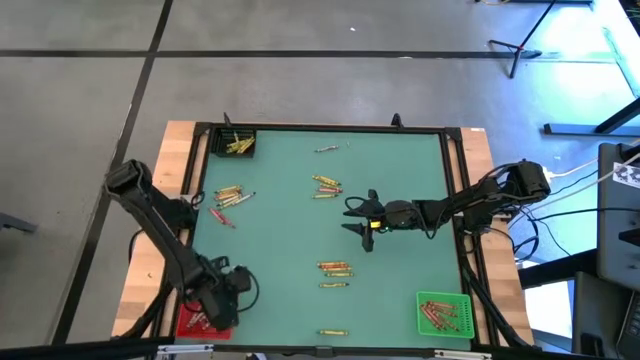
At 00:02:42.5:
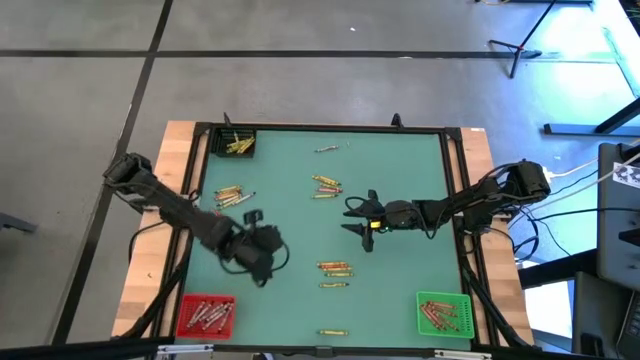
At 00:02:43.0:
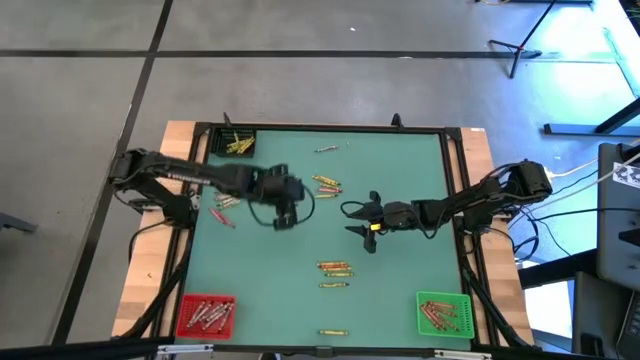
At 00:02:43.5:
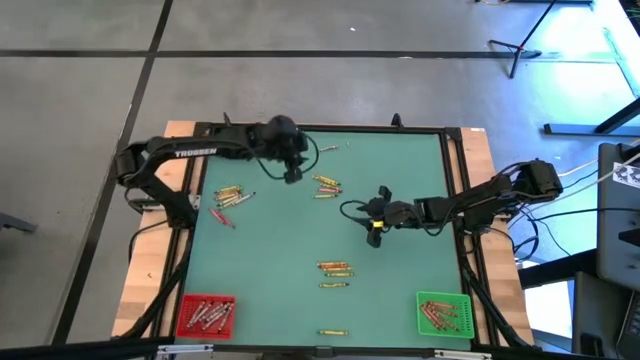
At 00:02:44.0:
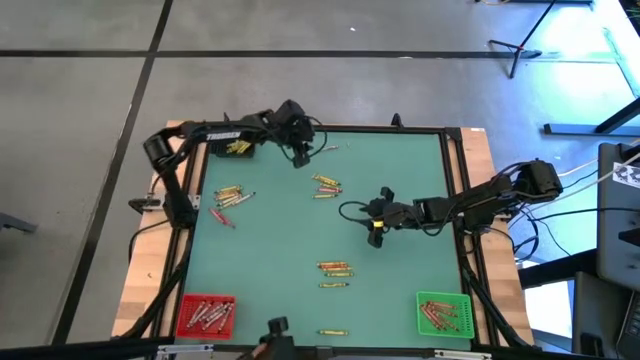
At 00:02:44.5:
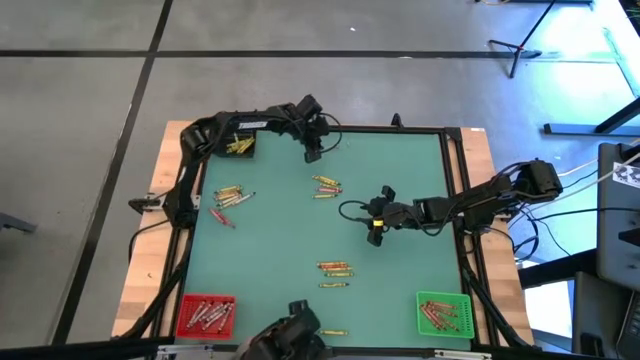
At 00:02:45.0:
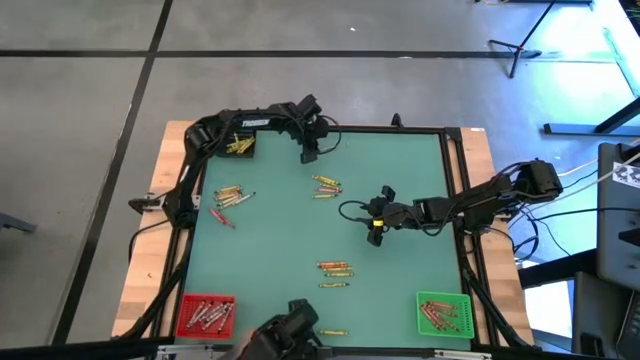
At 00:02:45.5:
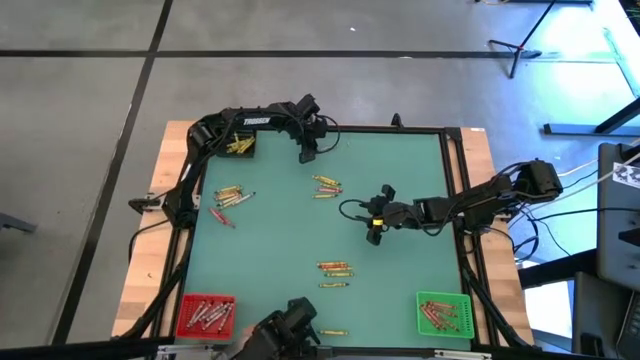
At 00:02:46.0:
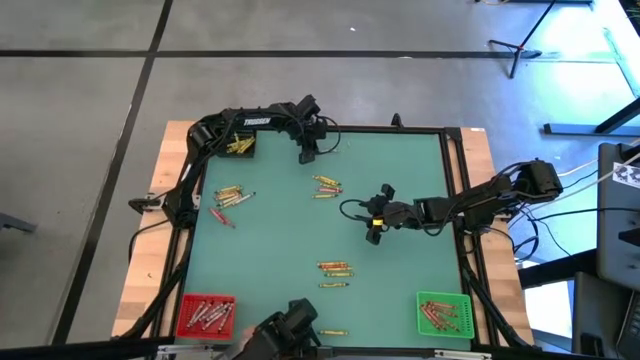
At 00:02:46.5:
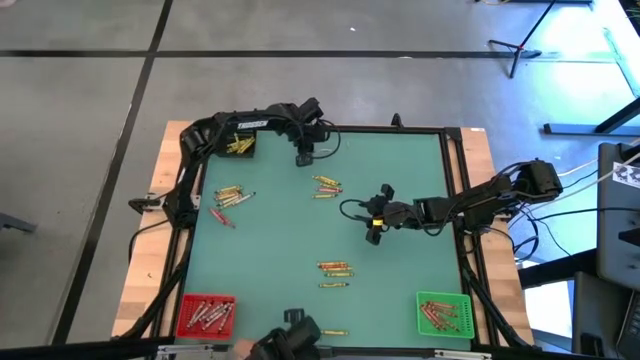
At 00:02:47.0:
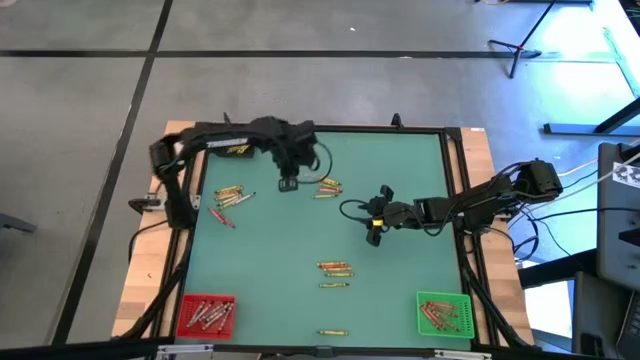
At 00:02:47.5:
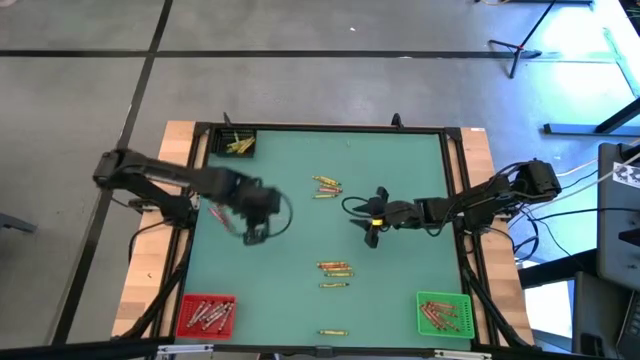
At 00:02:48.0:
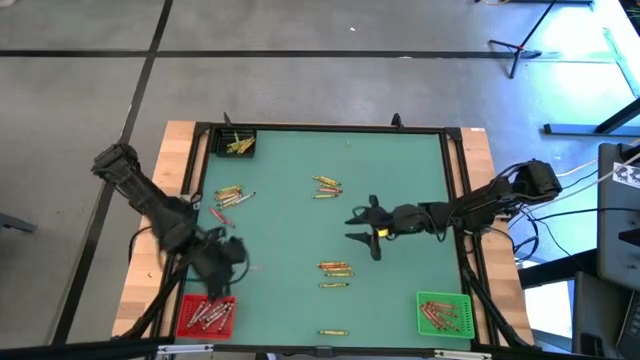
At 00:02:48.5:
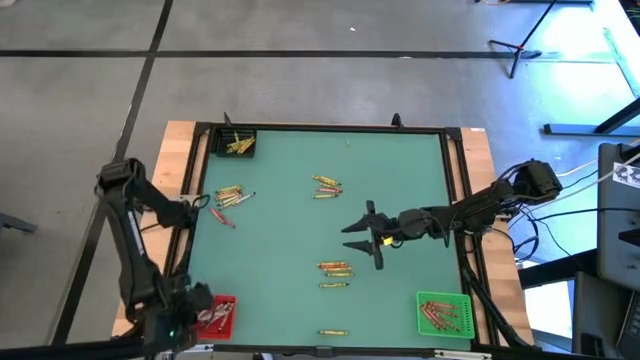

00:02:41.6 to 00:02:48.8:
Task: Sort crayons
Put the top black crayon into the red bin

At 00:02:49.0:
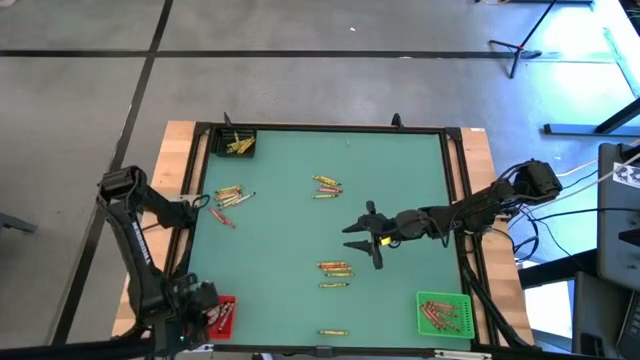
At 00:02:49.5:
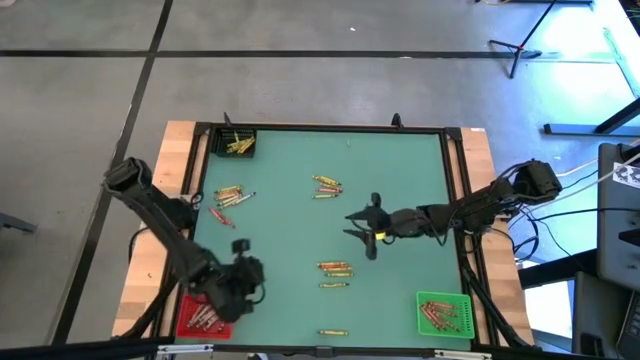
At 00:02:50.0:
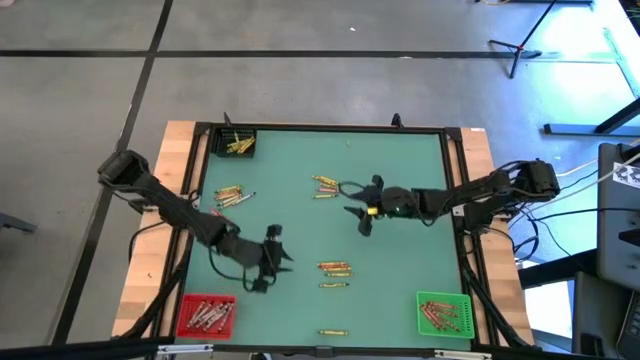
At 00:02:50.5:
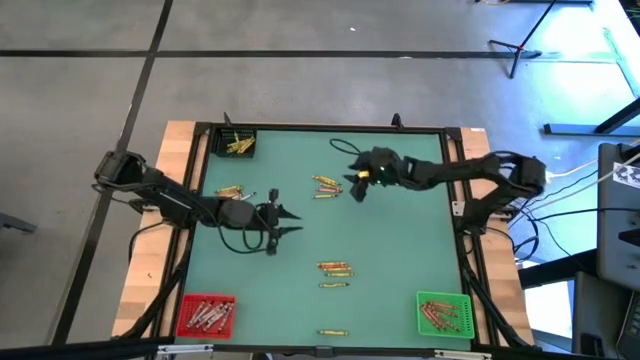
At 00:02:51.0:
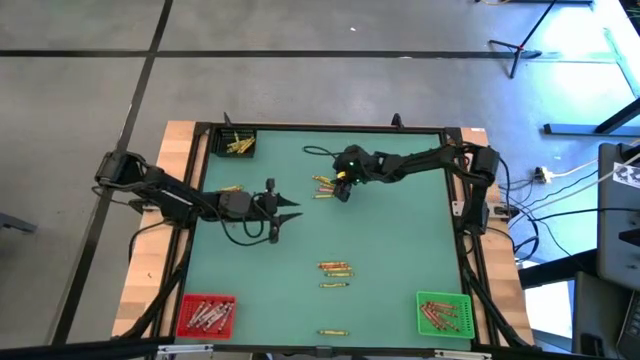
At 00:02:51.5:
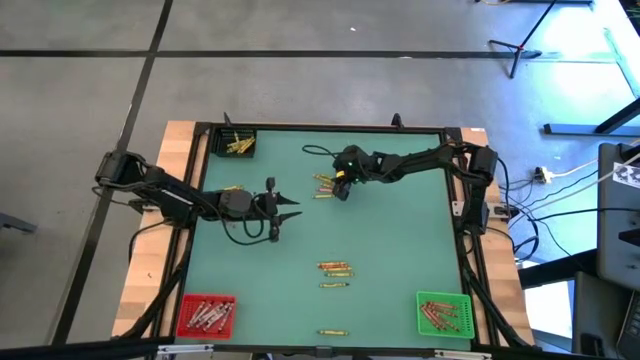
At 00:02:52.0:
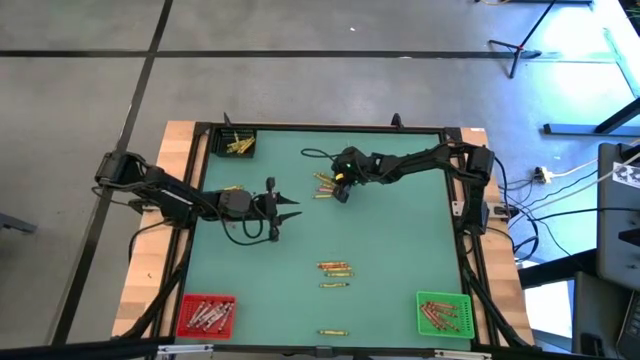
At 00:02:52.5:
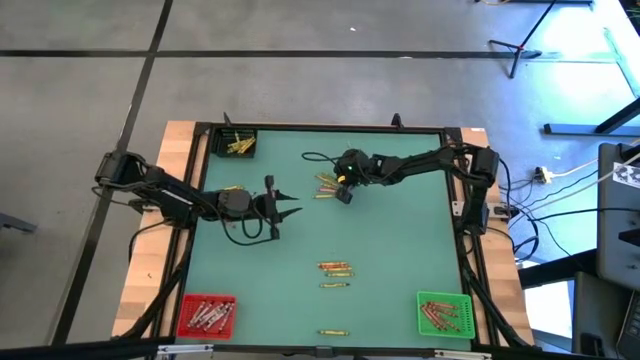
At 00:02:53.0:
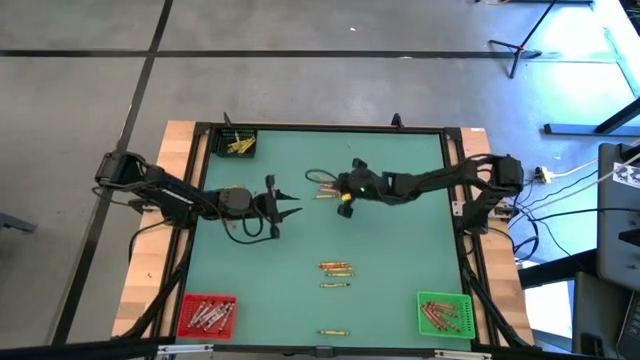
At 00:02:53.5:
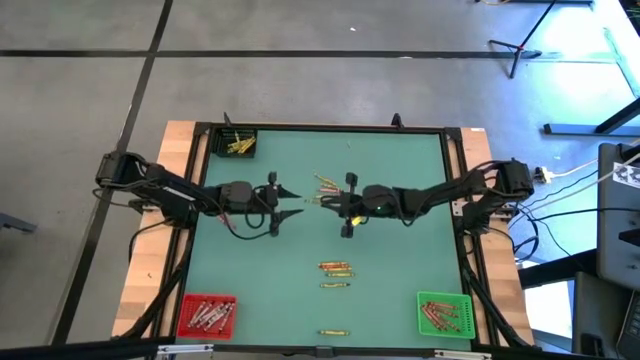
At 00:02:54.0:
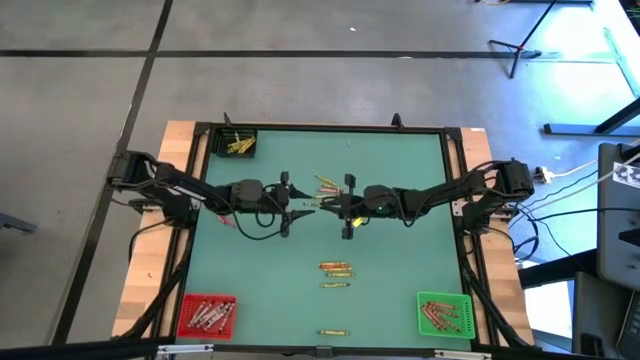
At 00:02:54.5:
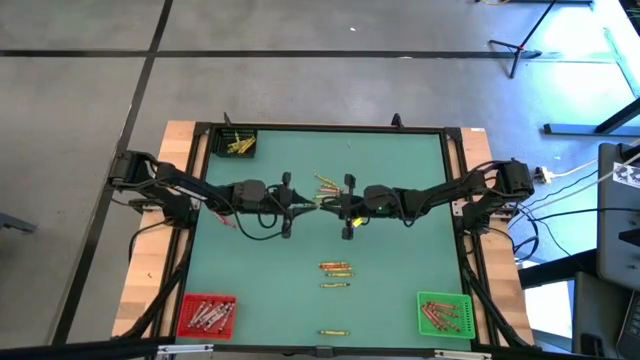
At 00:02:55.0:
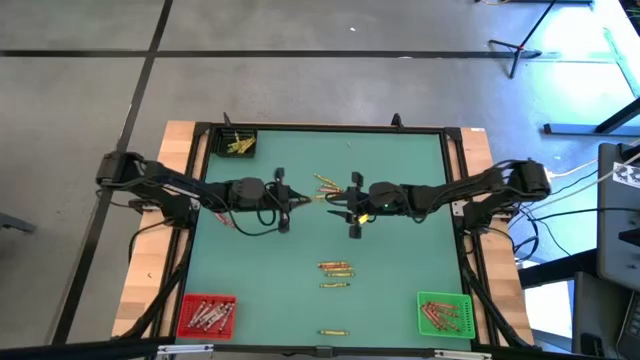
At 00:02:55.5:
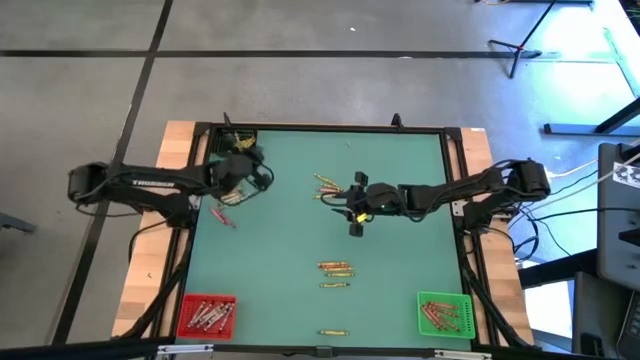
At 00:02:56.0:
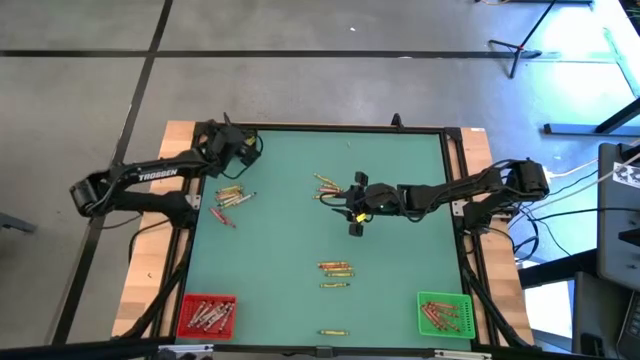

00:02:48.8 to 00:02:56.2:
Put the green crayon into the black bin

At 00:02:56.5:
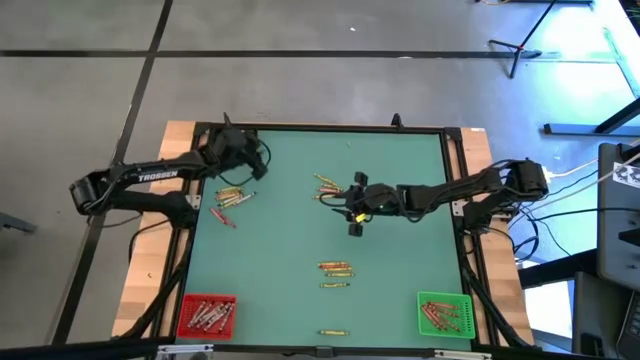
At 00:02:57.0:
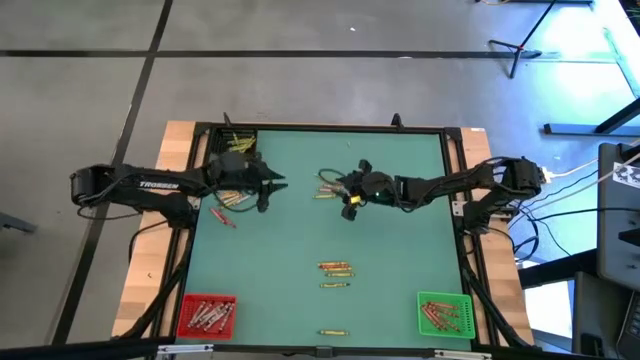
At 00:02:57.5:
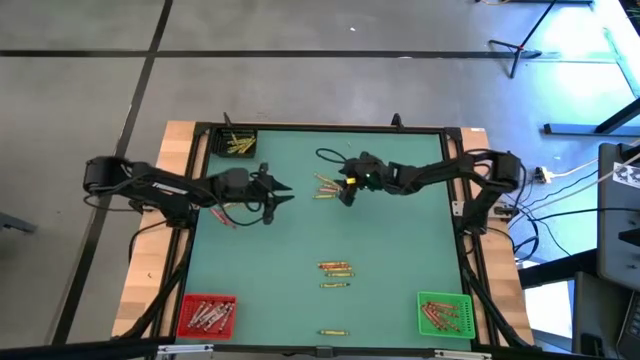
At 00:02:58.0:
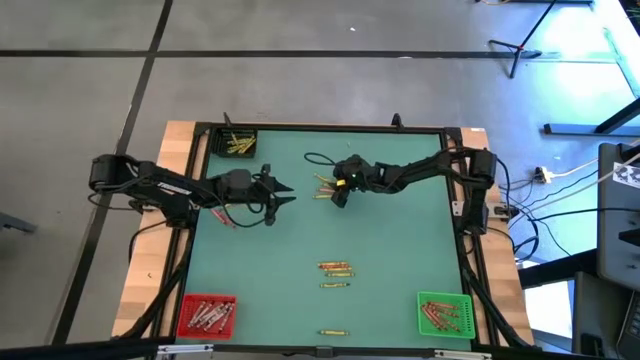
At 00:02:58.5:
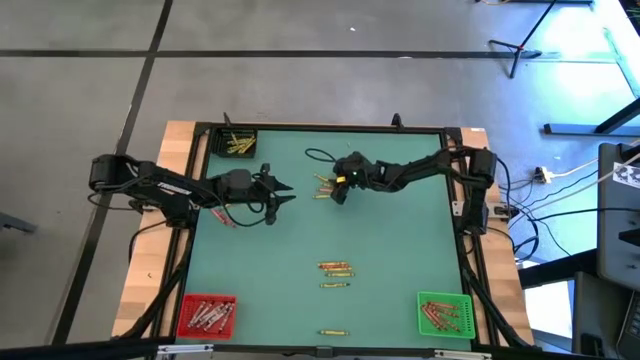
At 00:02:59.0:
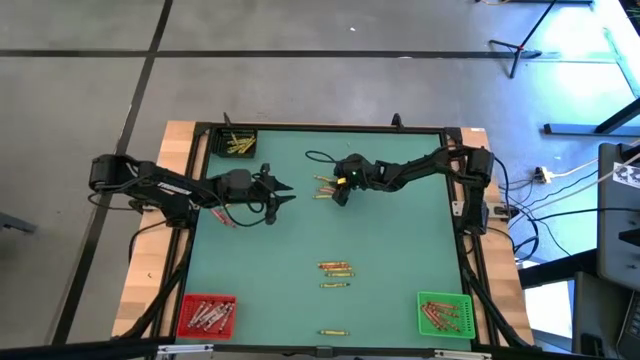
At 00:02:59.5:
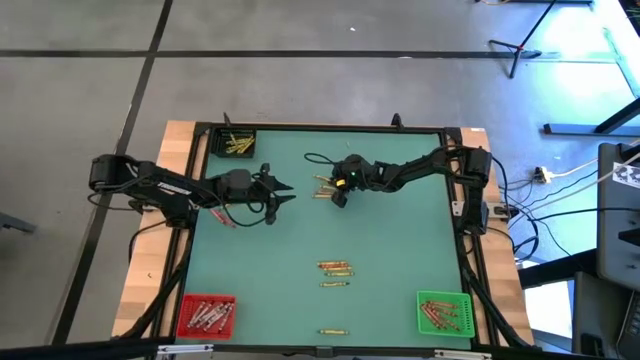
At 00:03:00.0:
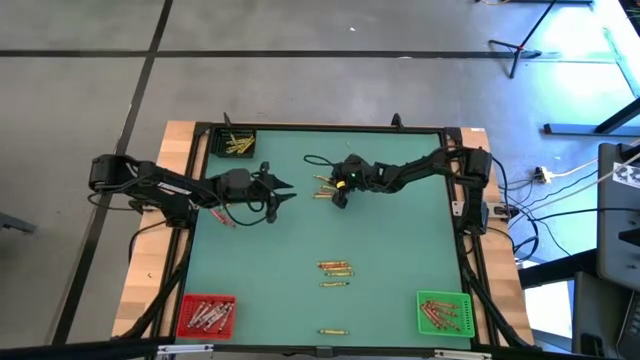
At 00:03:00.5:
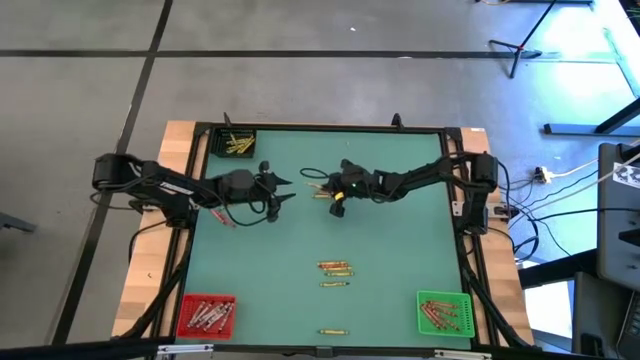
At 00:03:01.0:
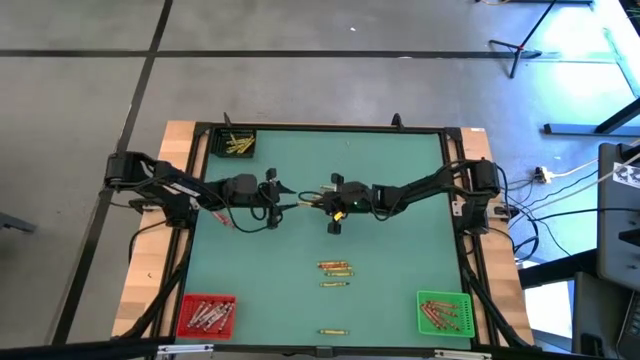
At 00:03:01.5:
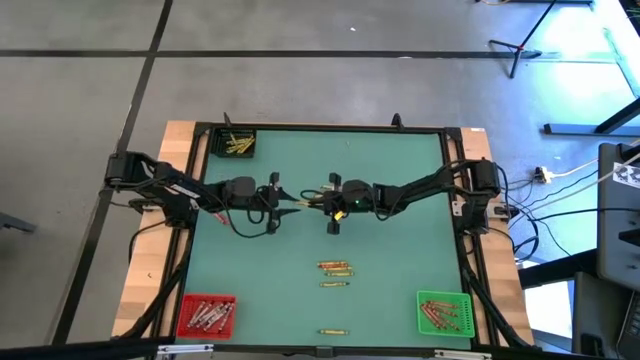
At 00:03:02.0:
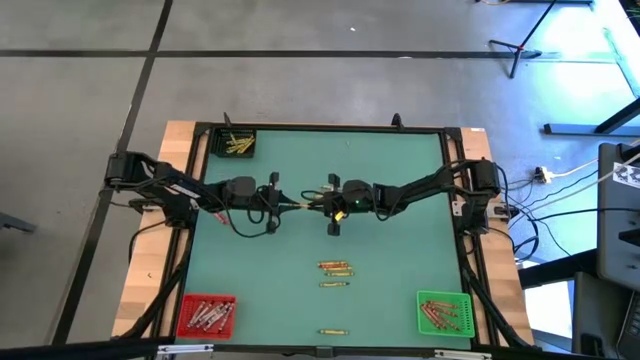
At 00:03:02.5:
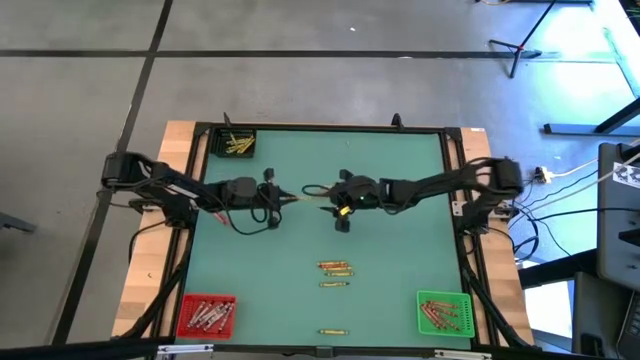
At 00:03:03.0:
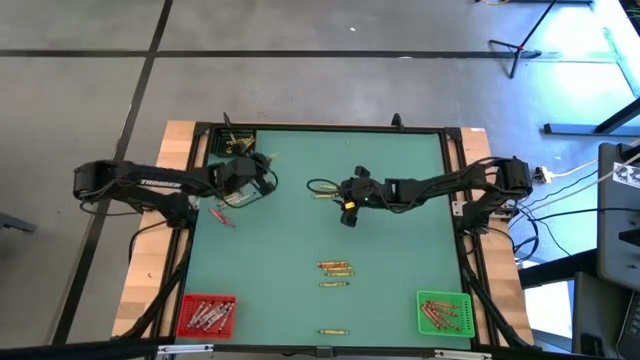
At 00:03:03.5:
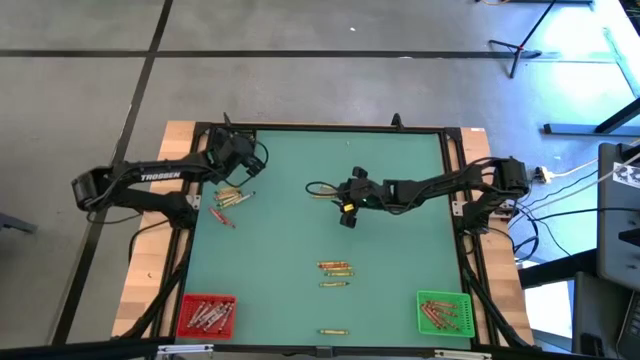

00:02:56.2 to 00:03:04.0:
Put the yellow crayon into the black bin
